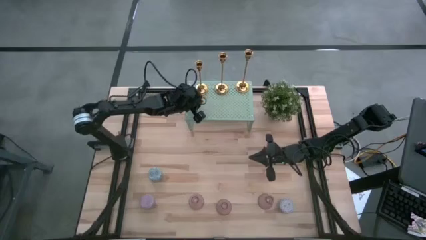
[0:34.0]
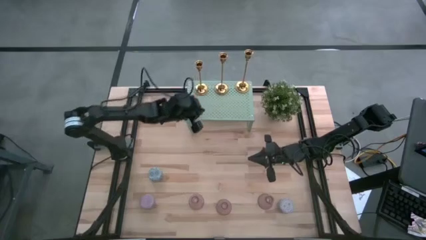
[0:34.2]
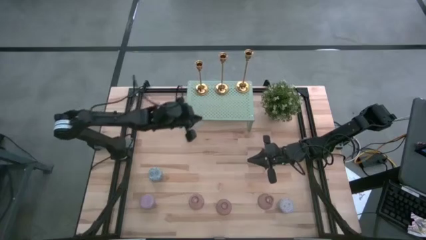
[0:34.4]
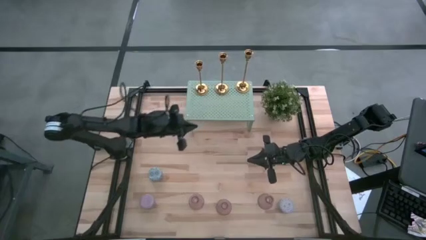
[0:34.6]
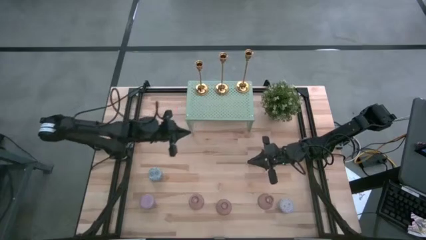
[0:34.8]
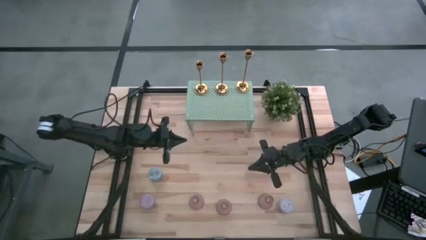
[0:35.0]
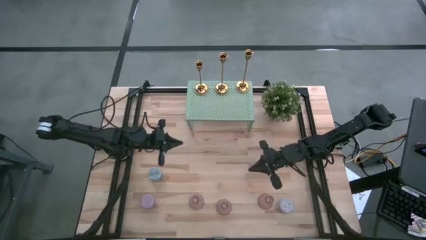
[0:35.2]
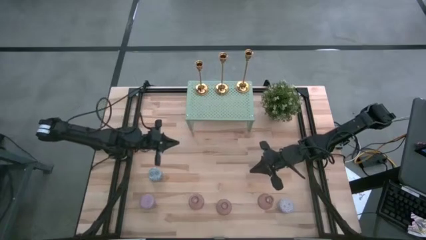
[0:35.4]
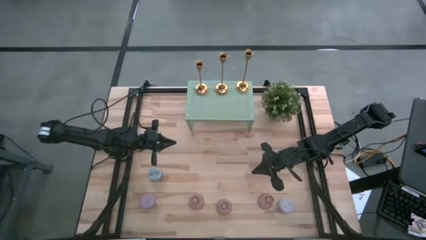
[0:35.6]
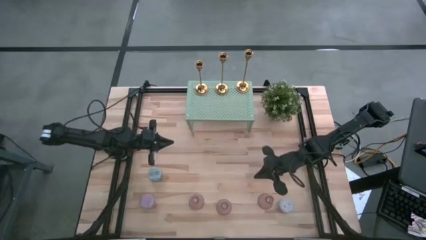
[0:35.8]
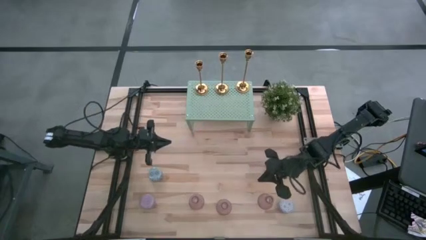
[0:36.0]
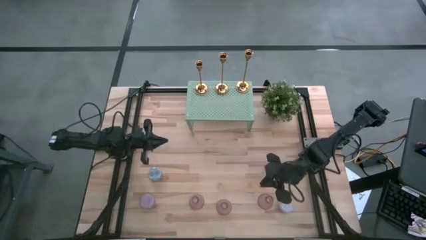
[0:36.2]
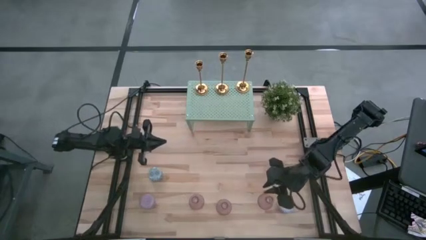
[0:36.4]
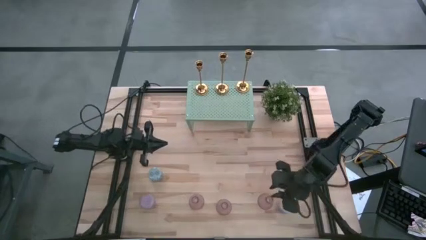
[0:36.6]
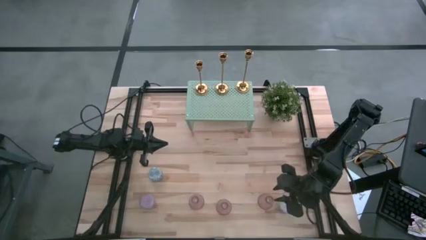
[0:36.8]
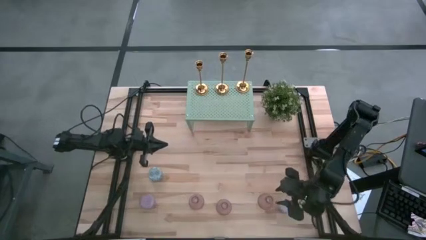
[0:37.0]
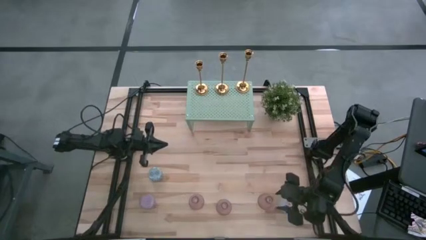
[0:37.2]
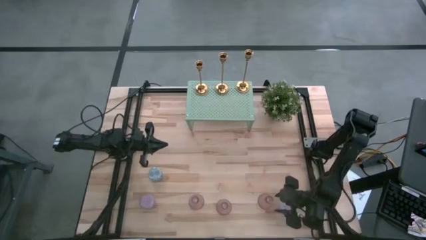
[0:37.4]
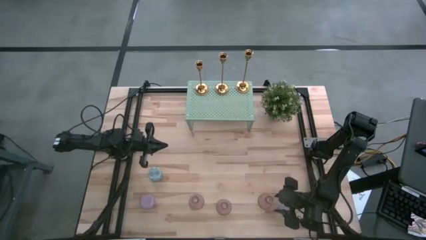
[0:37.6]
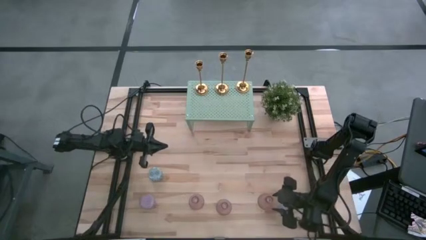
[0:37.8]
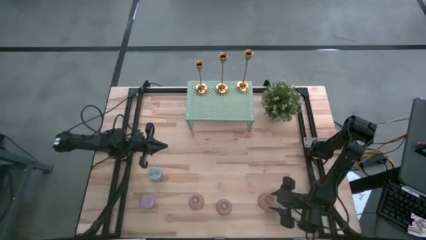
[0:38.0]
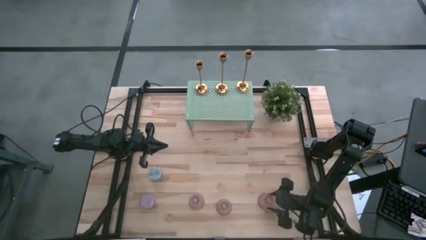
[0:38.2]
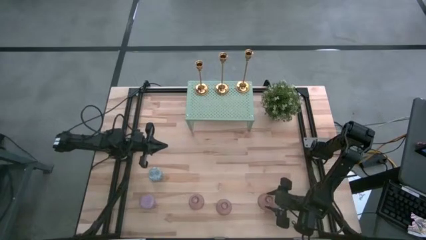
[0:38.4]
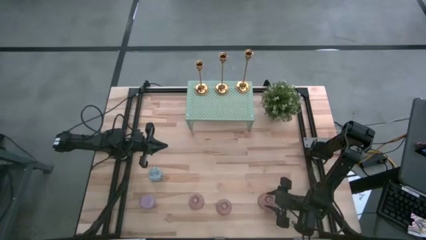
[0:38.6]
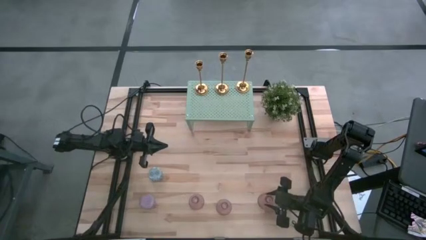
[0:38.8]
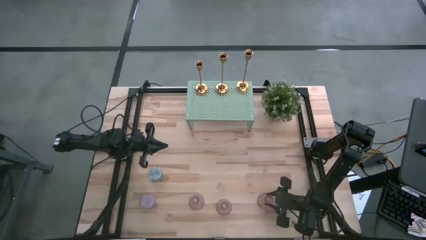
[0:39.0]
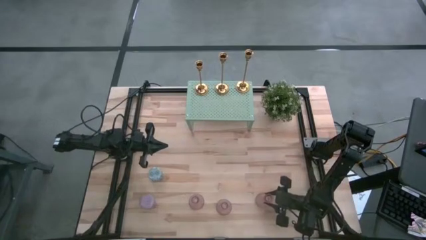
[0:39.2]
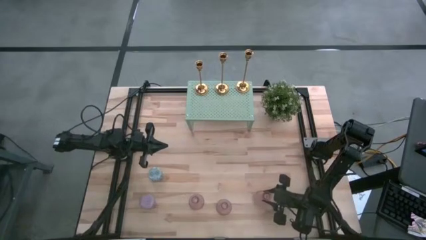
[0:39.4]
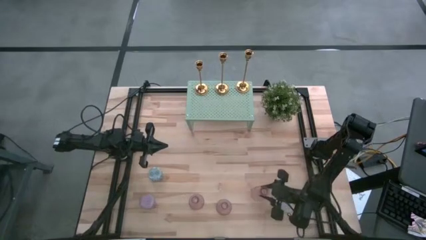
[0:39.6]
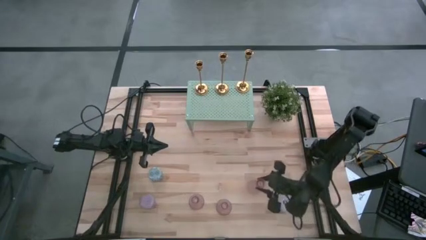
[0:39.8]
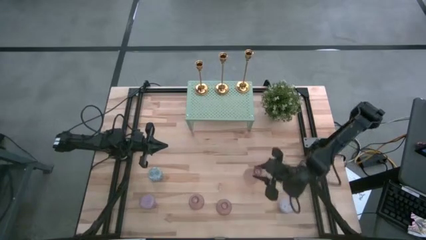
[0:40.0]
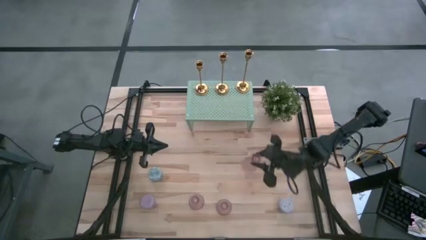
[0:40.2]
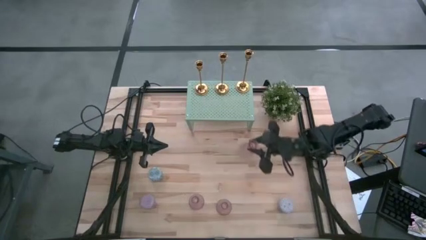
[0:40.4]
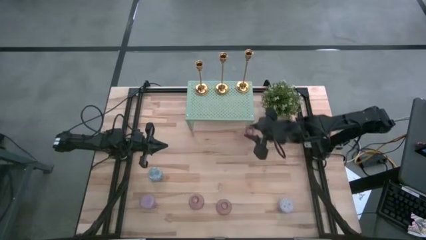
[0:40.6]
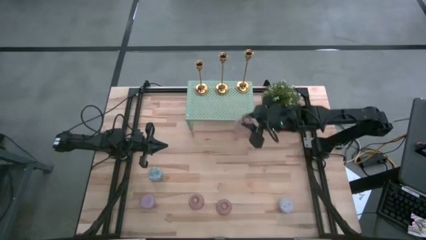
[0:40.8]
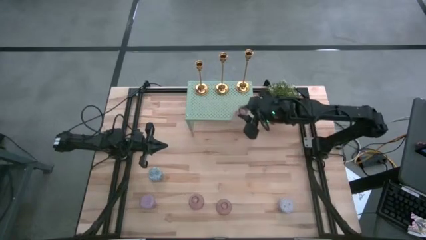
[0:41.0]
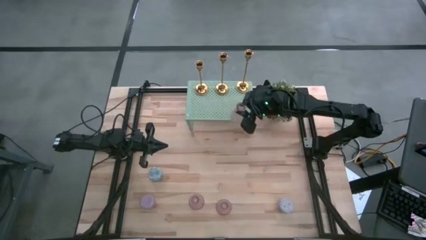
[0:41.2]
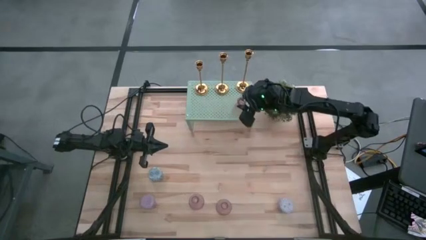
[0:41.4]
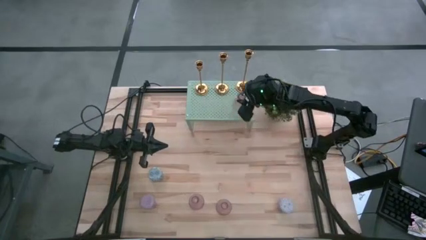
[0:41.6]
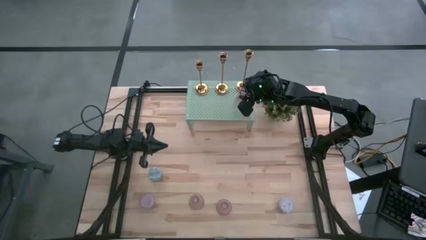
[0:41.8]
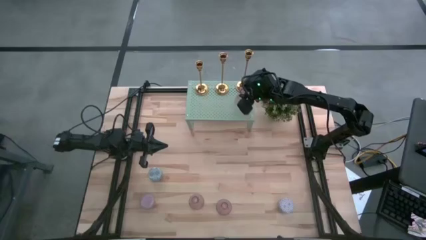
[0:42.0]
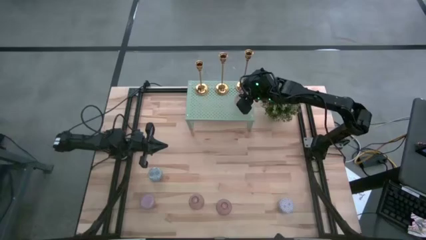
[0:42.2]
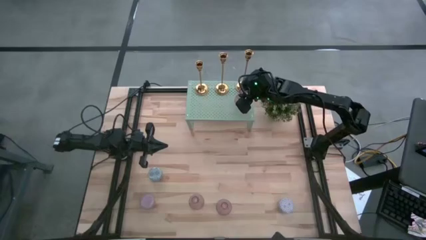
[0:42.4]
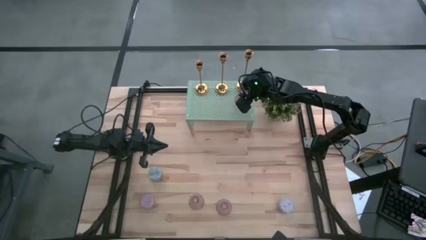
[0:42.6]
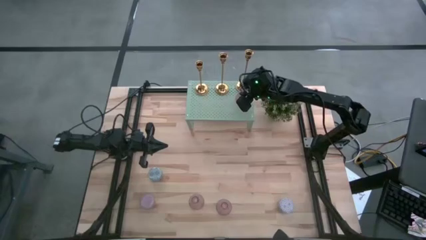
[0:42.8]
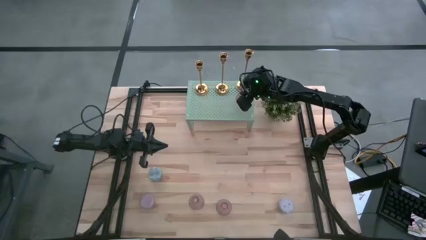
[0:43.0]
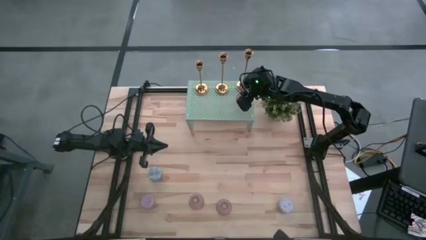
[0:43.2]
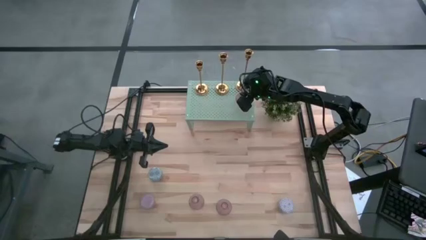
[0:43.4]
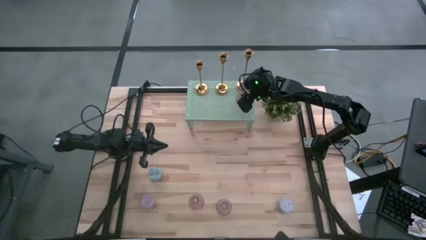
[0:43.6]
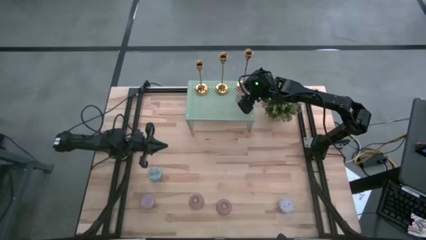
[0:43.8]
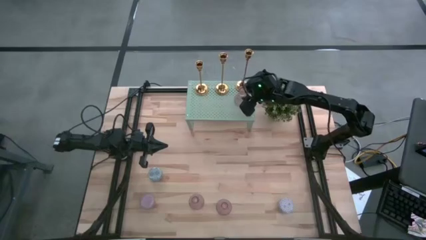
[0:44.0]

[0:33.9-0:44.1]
Task: Pick & Place candle stick holders
Put the right pink glass candle holder on the shelf
